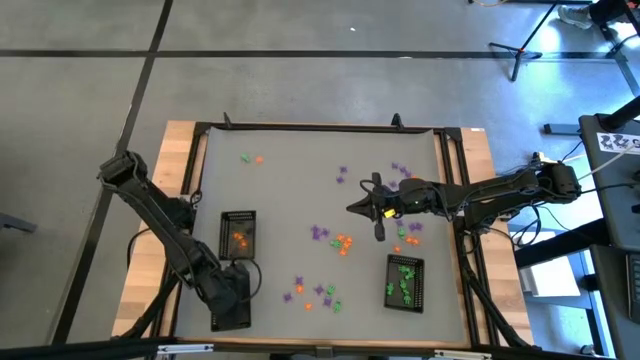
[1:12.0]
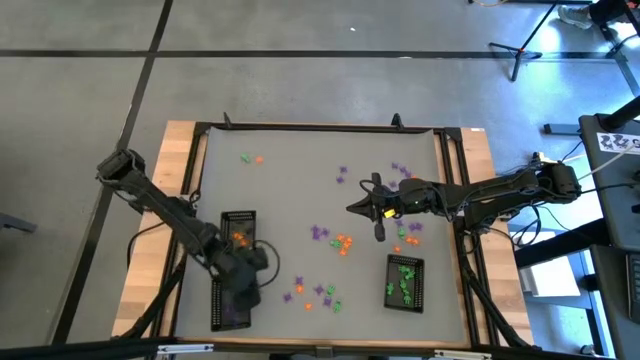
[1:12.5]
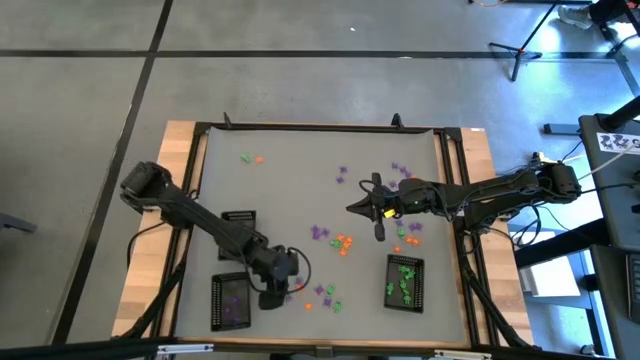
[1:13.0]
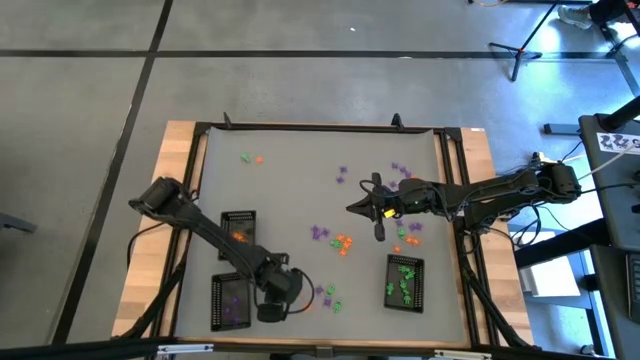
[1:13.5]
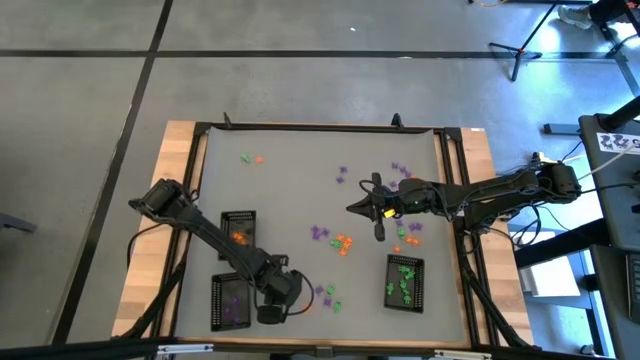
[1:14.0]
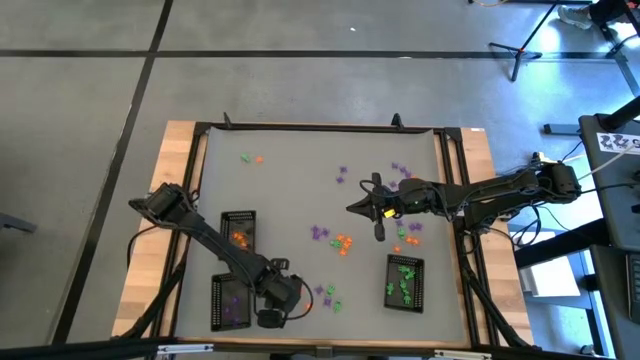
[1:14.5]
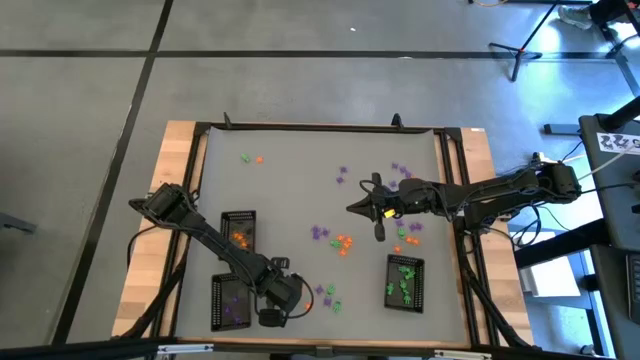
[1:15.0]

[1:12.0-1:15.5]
Task: Sort Halloween decoration
Put the purple spider toy into the bottom left black basket

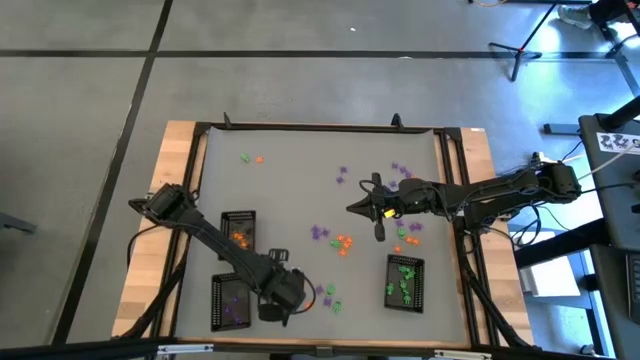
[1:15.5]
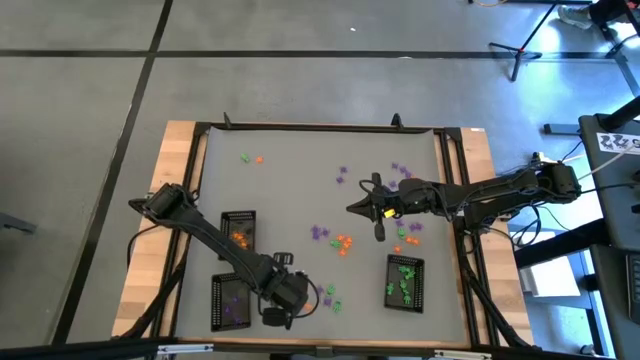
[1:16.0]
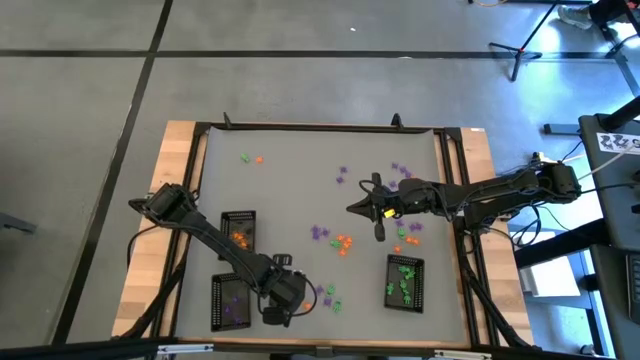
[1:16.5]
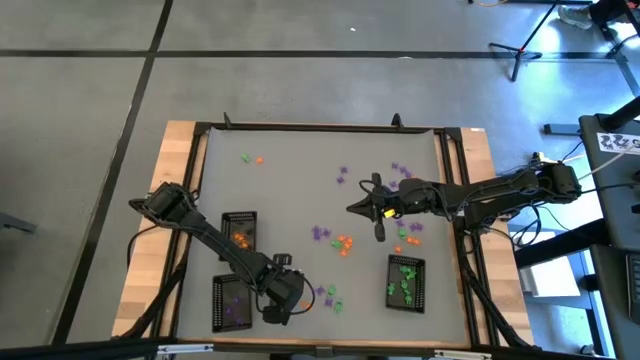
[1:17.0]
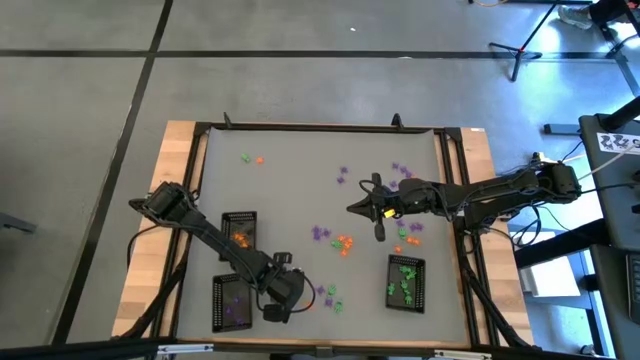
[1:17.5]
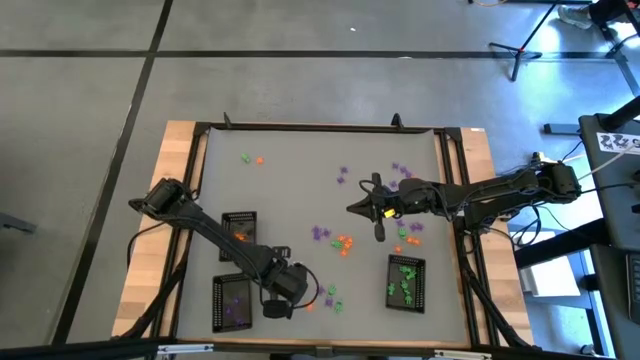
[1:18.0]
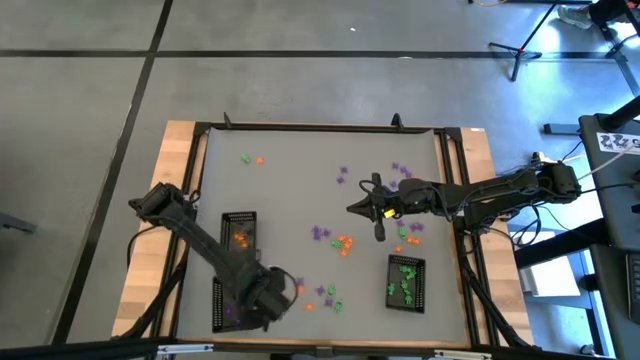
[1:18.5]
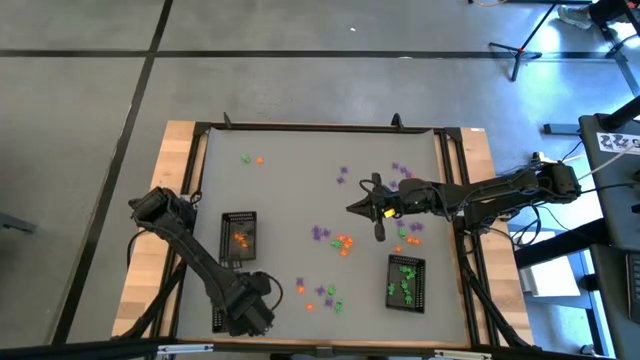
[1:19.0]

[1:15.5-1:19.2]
Put the purple spider toy into the bottom left black basket

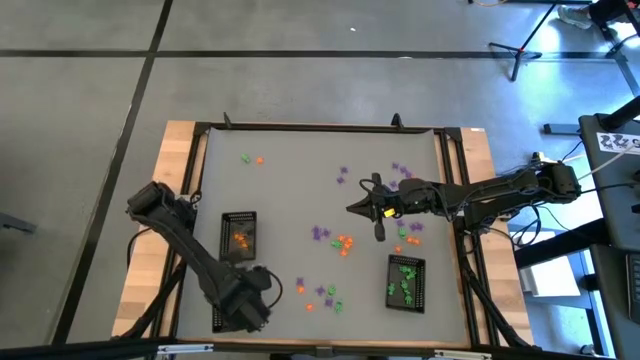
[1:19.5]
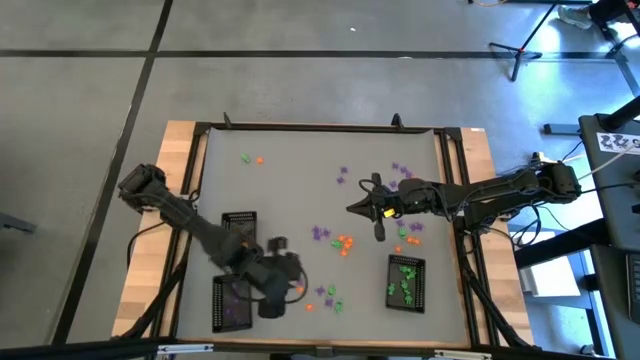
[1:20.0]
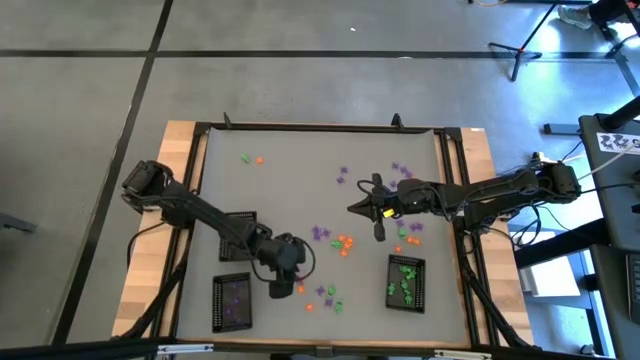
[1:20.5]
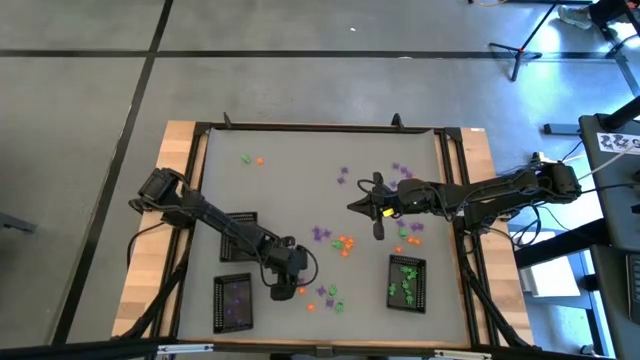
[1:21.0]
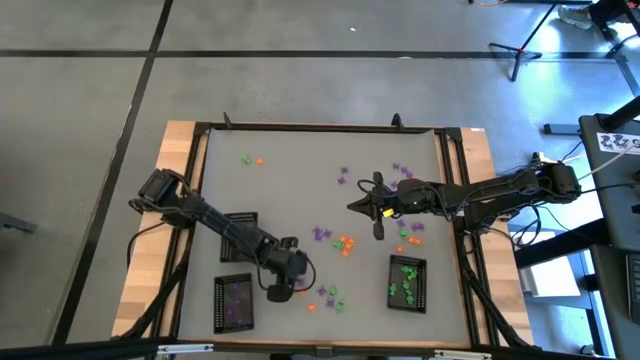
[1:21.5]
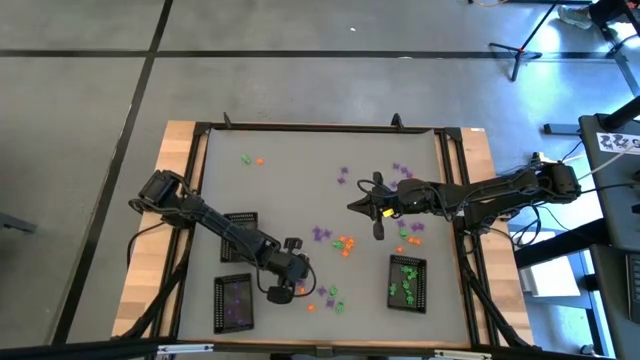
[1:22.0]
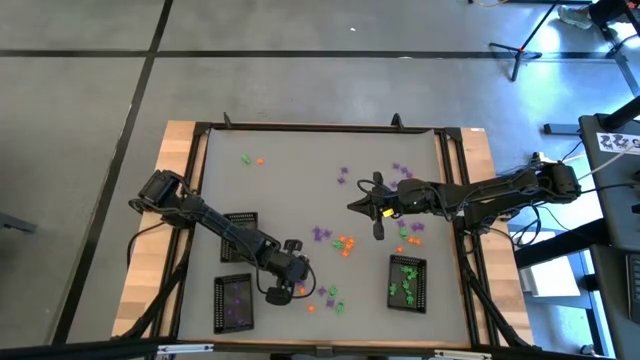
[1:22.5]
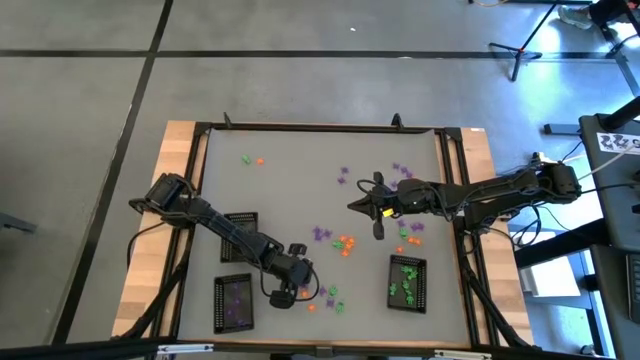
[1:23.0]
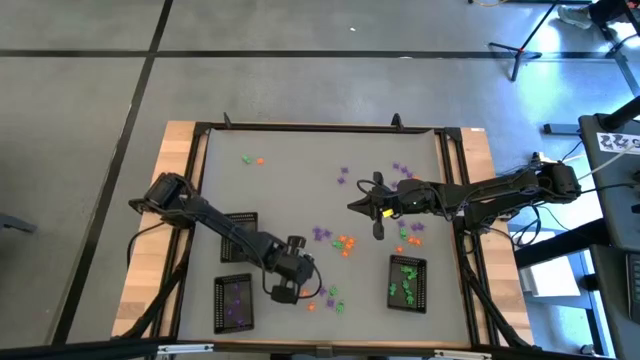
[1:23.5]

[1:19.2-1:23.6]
Put the purple spider toy into the bottom left black basket

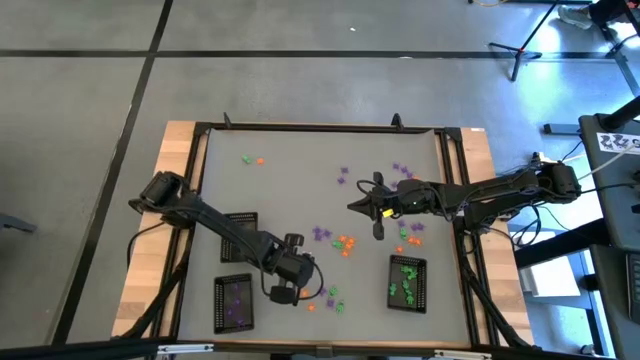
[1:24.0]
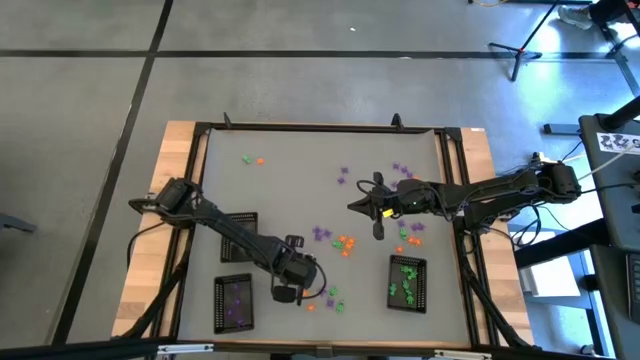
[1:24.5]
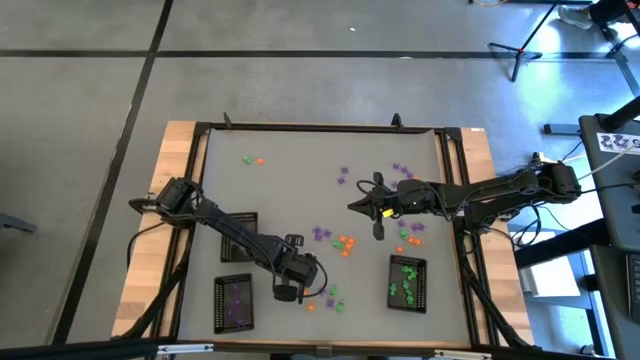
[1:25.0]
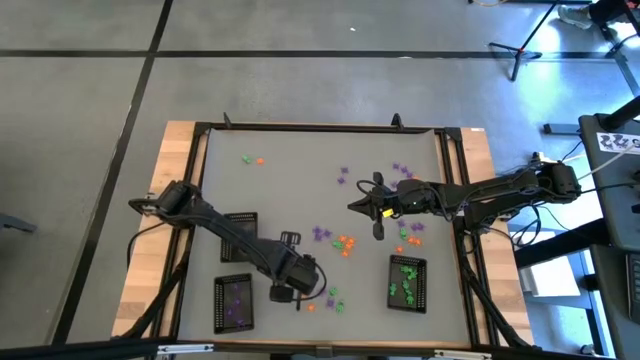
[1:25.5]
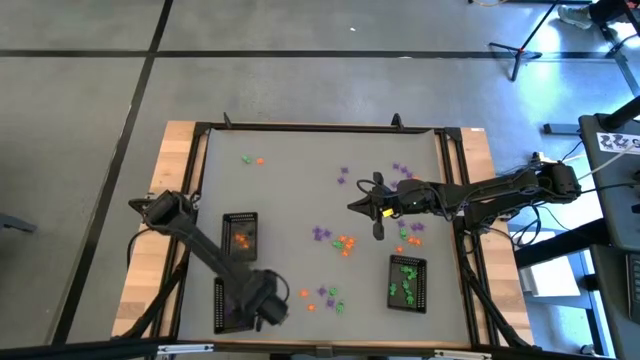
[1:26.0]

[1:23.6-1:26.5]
Put the purple spider toy into the bottom left black basket

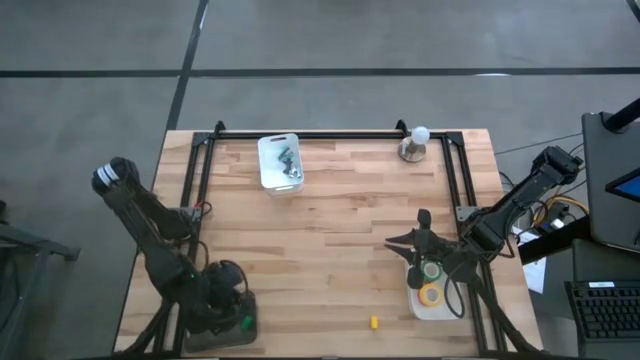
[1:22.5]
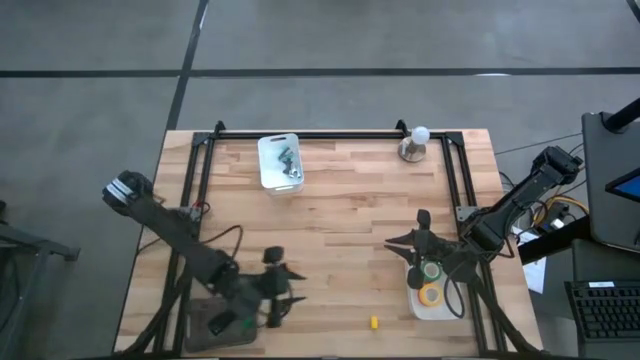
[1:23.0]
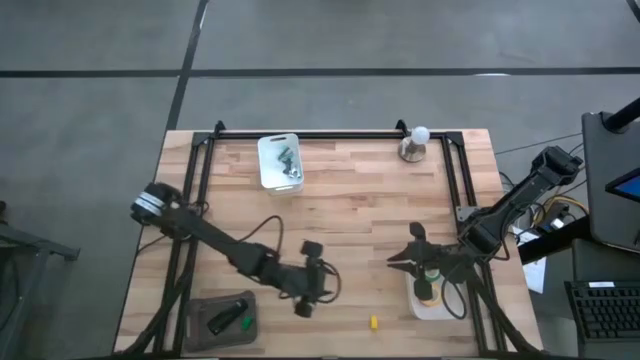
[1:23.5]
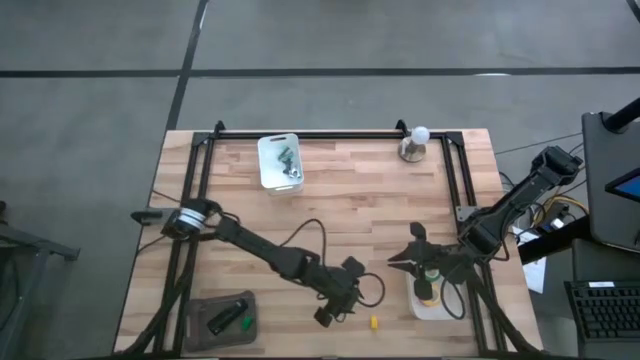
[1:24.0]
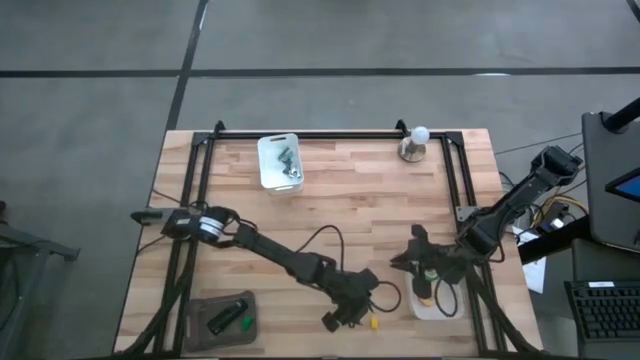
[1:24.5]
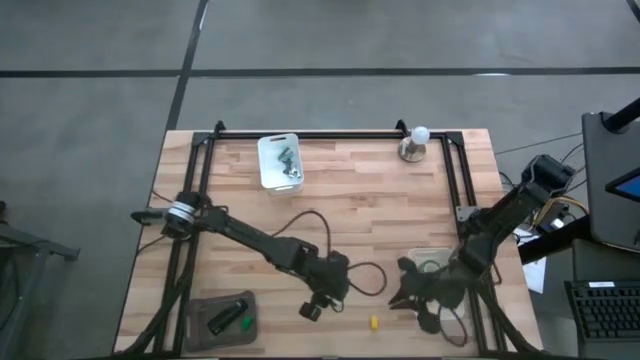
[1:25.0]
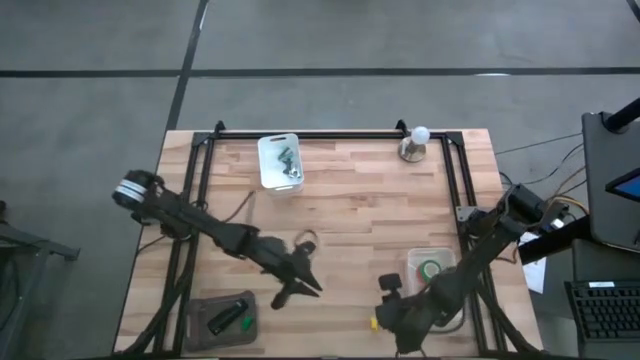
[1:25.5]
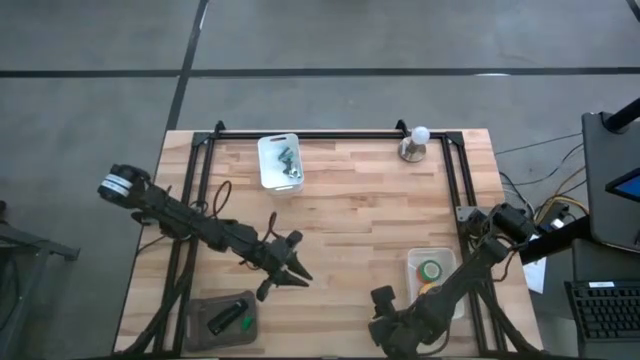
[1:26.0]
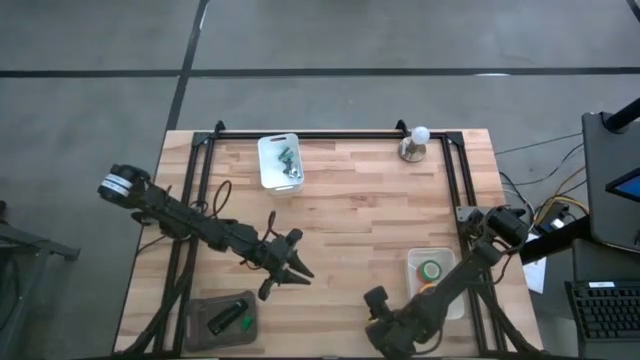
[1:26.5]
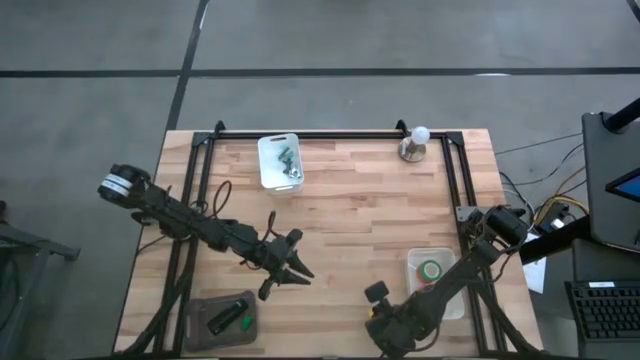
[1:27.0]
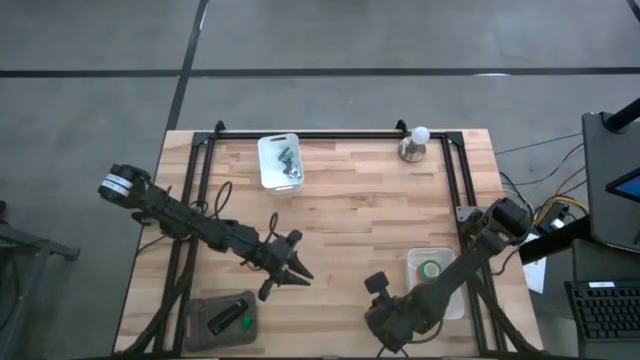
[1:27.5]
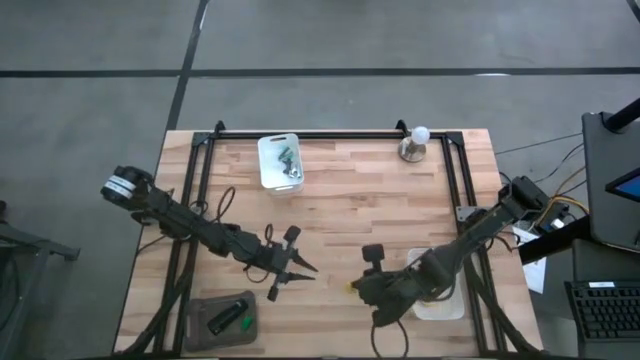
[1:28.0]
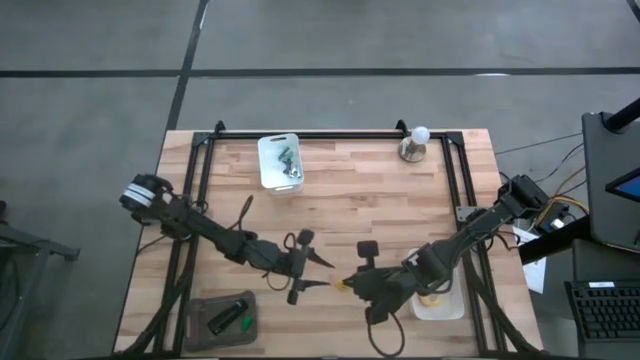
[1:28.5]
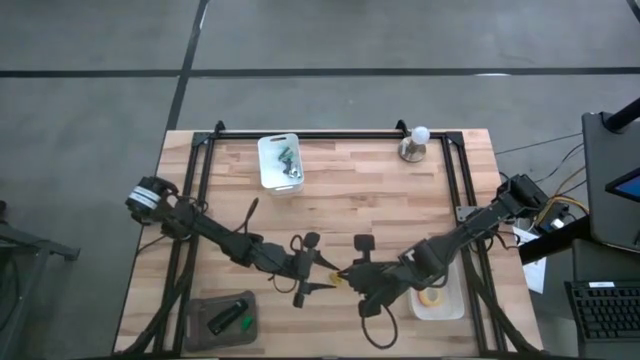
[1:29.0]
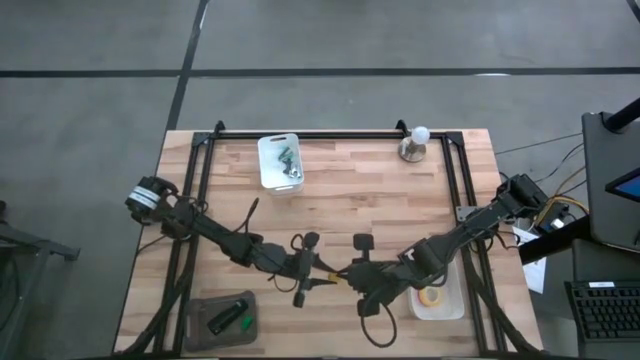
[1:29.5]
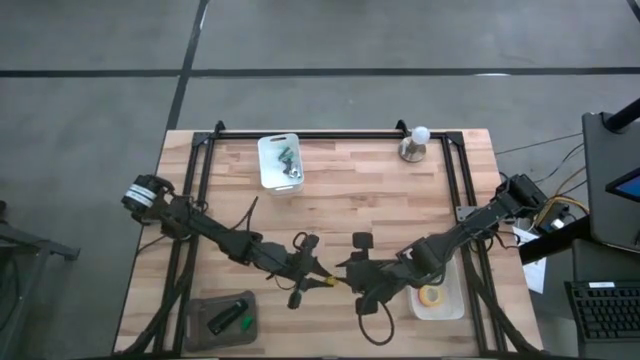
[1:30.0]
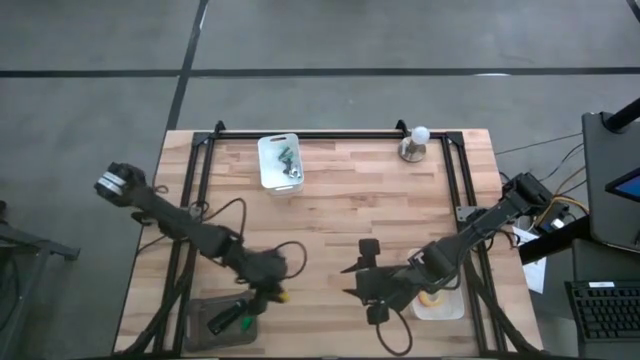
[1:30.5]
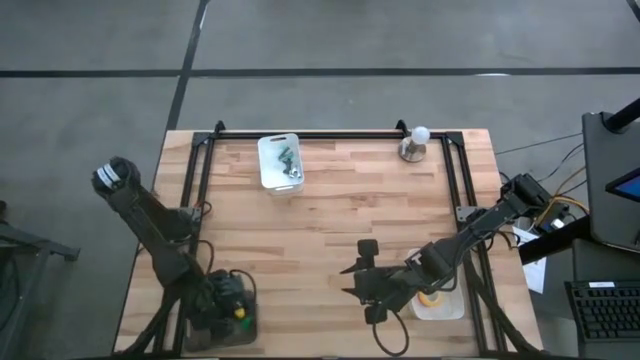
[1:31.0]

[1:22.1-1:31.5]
Task: Pick and place Stapler, Stapler remover, tape
Put the yellow stapler into the black bin
